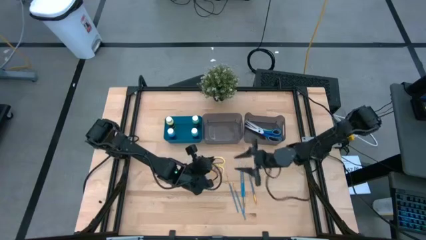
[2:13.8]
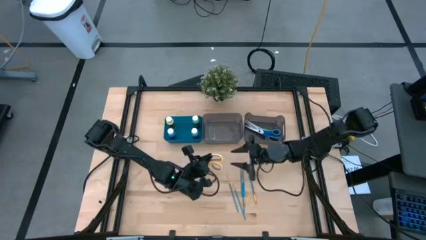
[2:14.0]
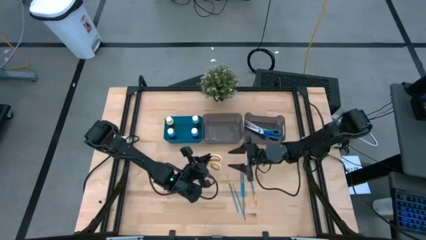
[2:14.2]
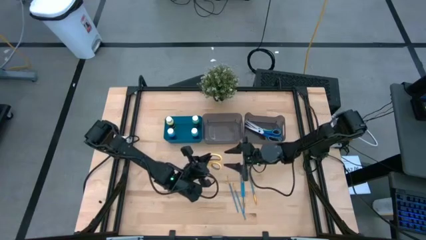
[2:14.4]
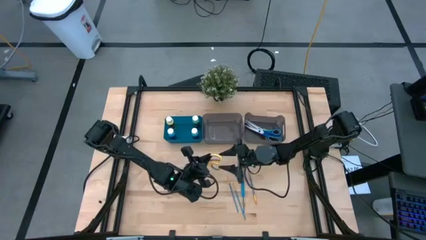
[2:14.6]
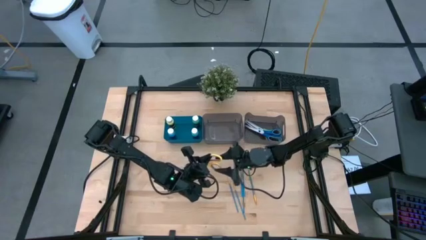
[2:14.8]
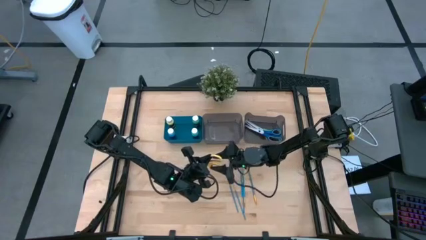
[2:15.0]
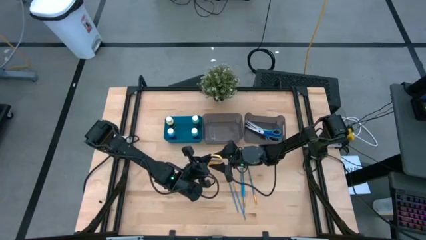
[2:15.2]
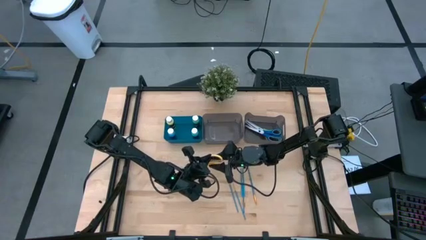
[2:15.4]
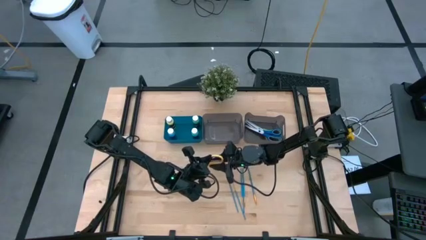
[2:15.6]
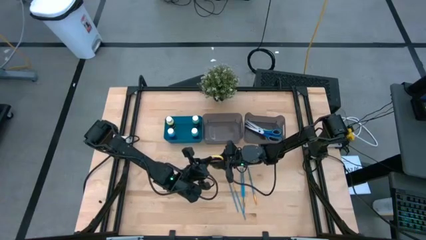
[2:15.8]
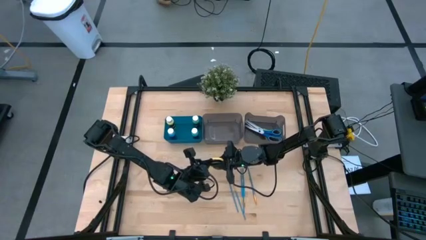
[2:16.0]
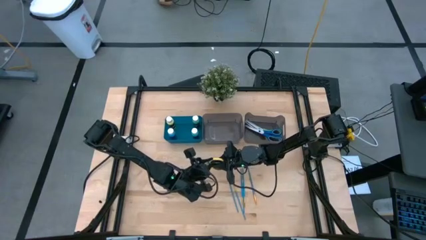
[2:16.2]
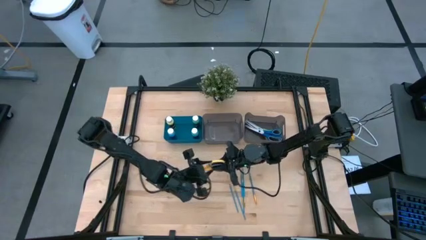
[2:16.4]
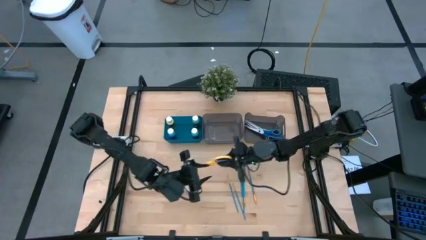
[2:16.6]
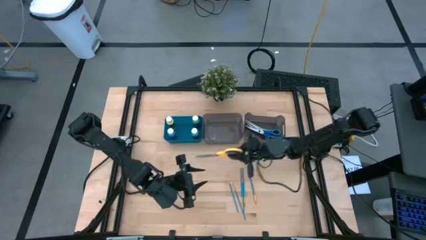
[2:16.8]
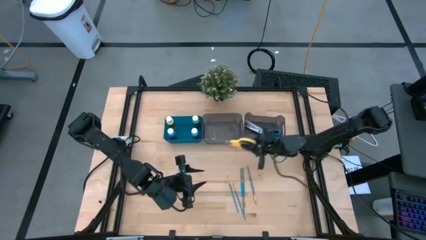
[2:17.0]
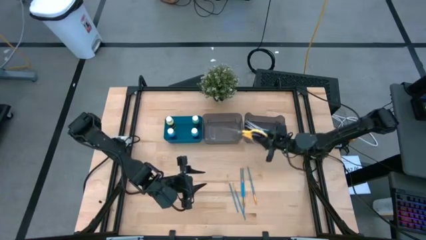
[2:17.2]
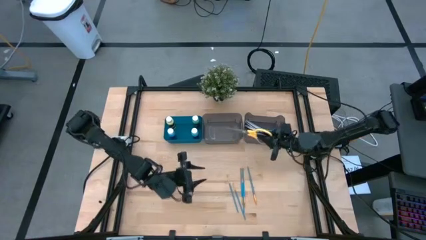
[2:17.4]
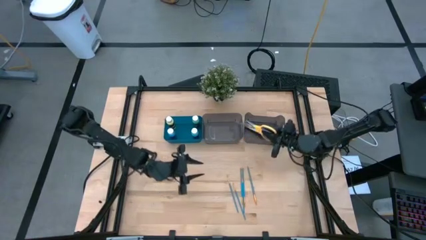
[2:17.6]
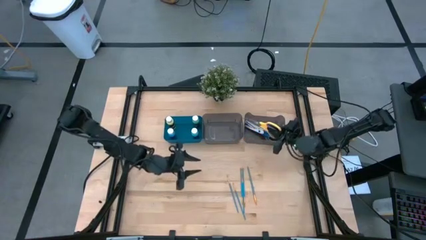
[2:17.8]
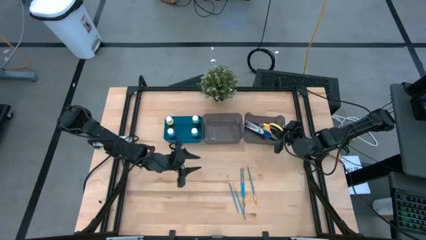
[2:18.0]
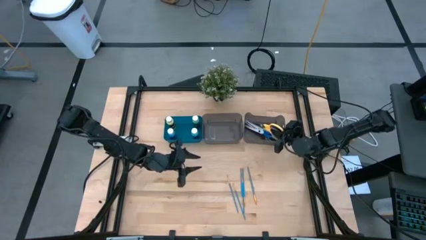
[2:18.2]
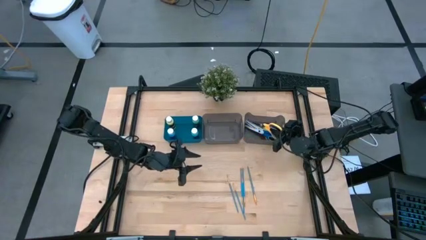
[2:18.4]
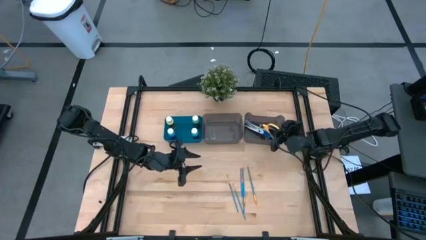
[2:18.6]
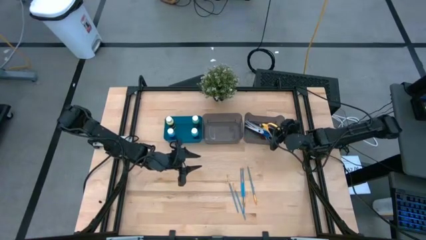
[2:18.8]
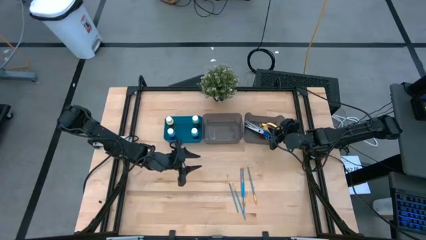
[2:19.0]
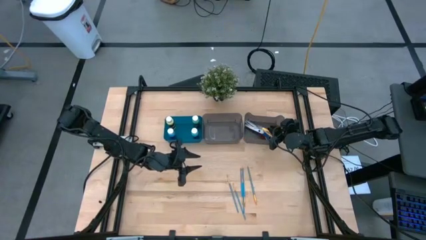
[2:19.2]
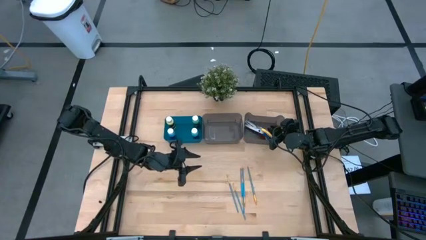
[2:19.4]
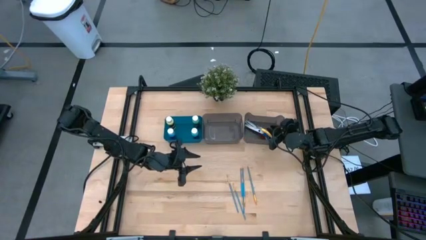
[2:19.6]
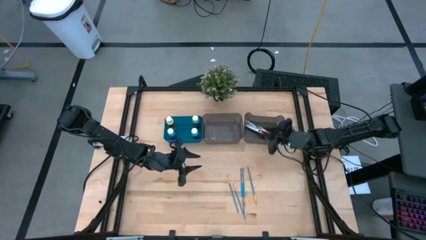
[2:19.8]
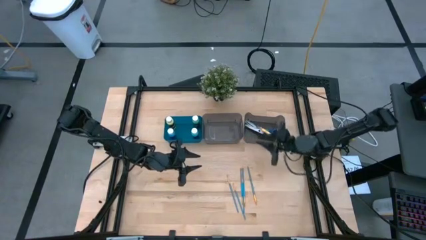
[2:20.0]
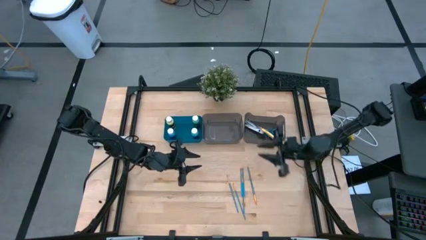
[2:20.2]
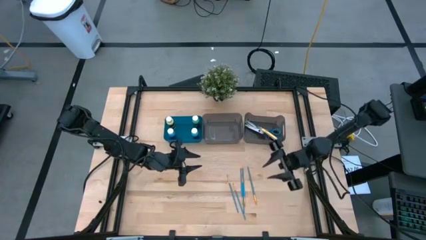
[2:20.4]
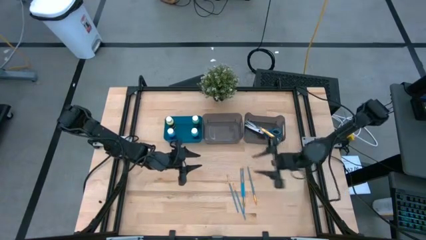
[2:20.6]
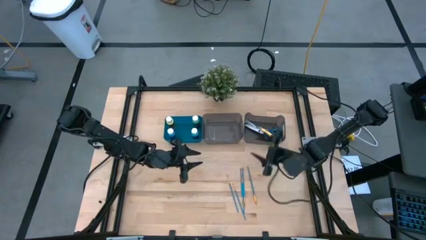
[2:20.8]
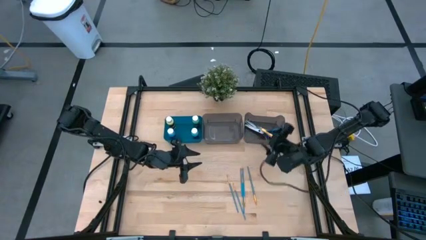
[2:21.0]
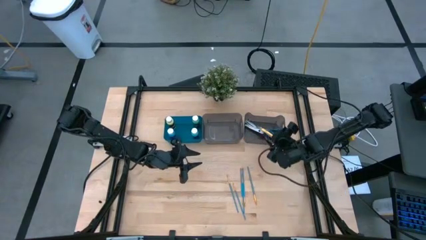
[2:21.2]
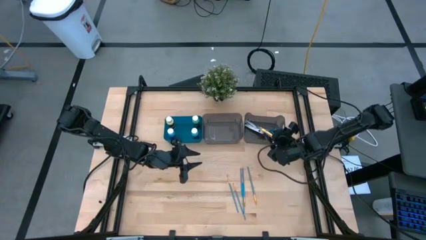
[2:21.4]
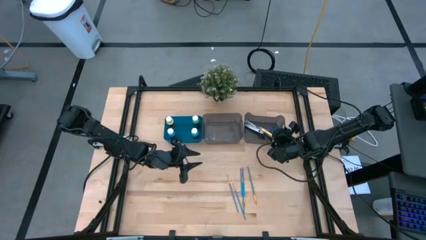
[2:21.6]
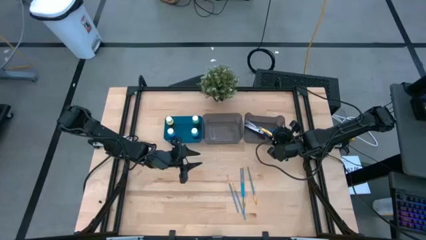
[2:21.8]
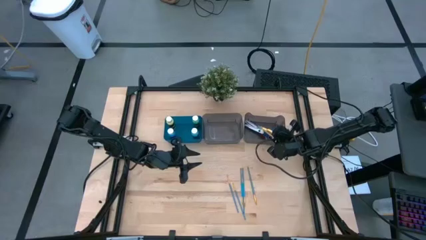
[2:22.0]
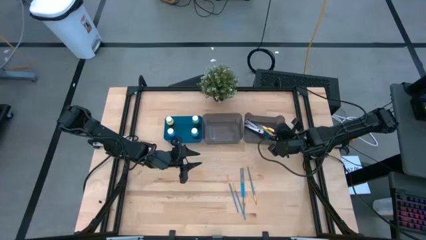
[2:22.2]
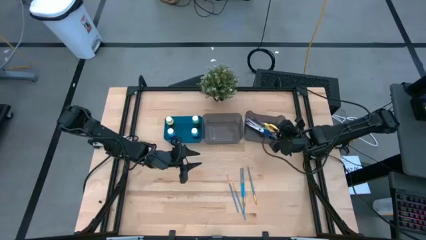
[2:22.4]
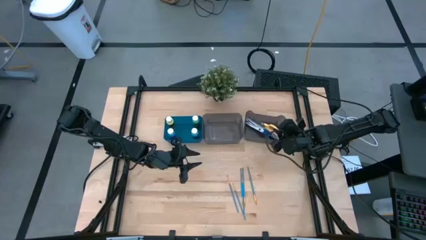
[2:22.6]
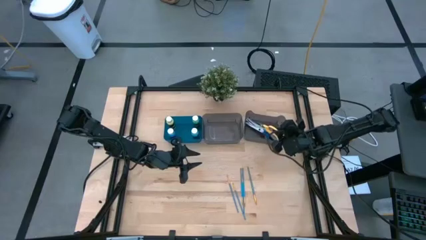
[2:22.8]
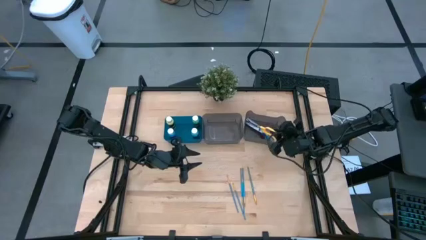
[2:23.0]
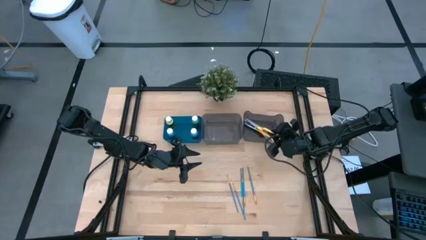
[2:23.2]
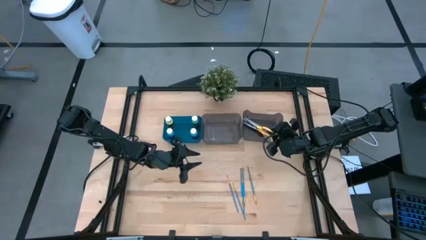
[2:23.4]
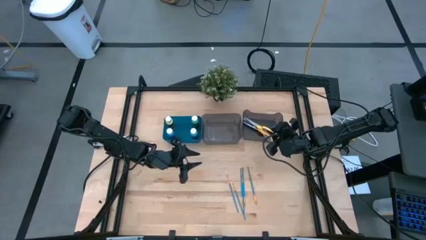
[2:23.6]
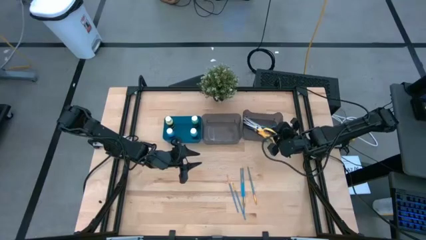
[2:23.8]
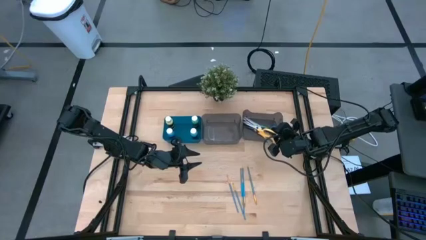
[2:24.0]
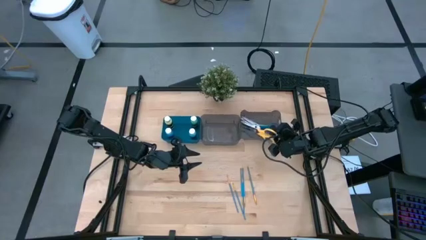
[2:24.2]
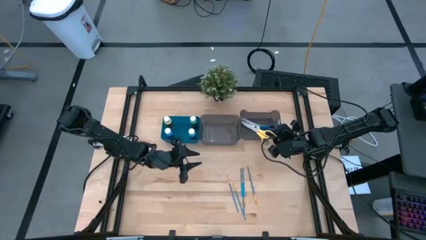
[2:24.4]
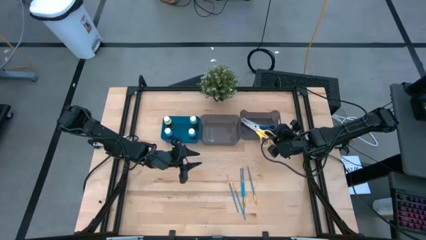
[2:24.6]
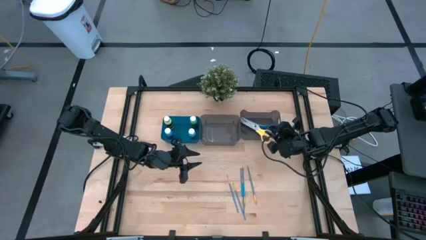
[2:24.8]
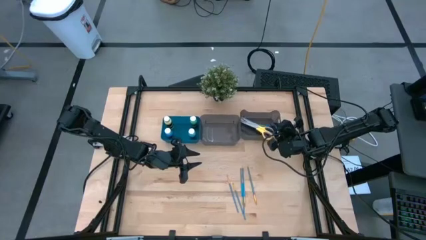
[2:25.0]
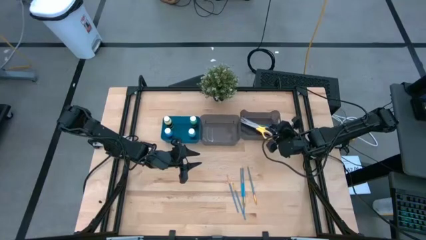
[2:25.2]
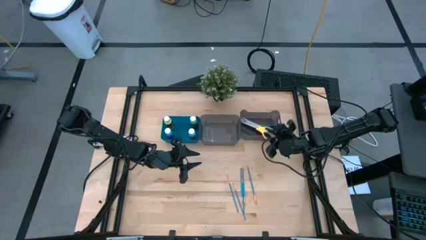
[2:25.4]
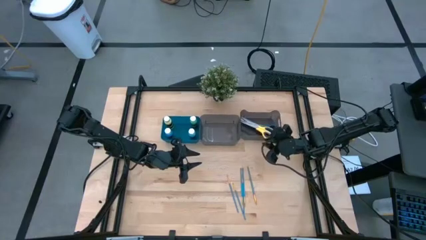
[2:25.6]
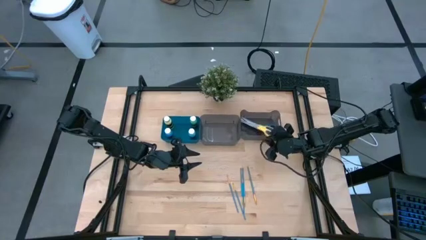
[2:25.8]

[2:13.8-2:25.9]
Task: Pick & Place Paint Supplies
Put the yellow scissor into the right black bin
